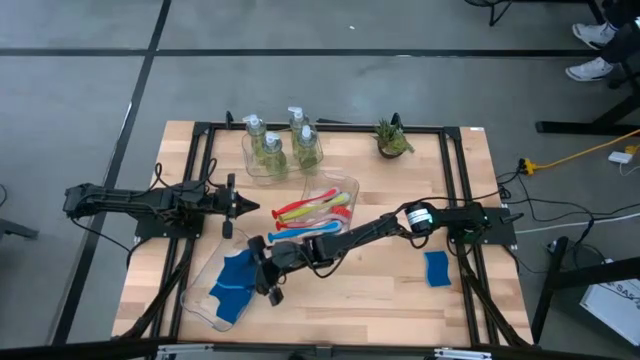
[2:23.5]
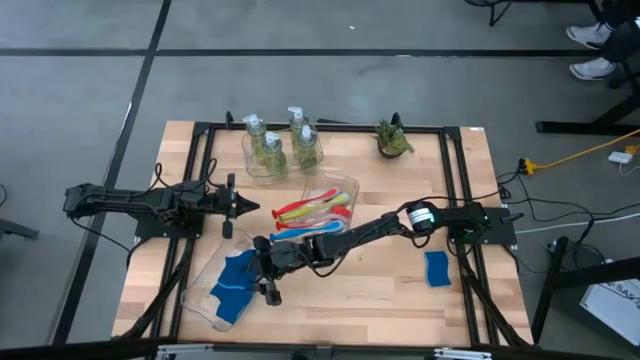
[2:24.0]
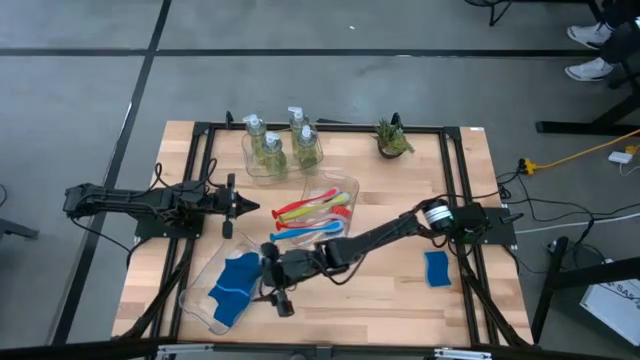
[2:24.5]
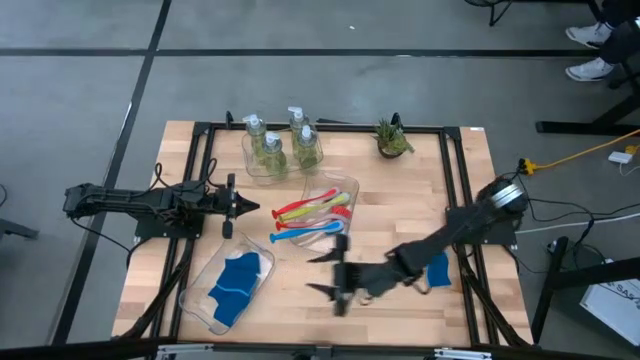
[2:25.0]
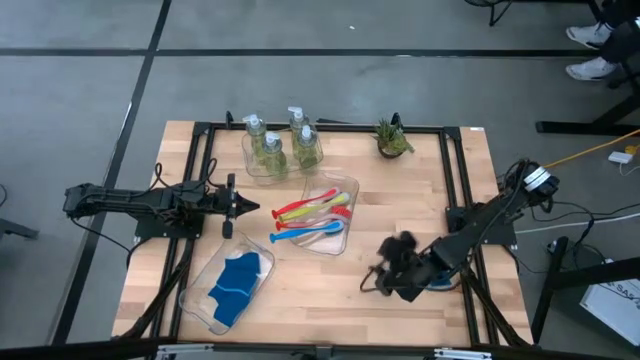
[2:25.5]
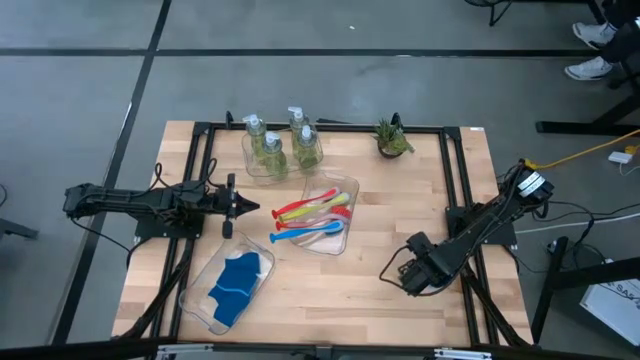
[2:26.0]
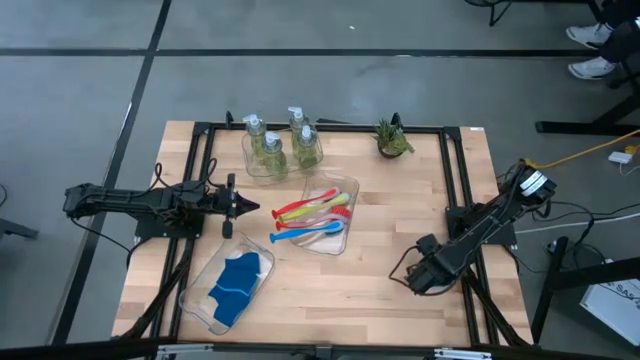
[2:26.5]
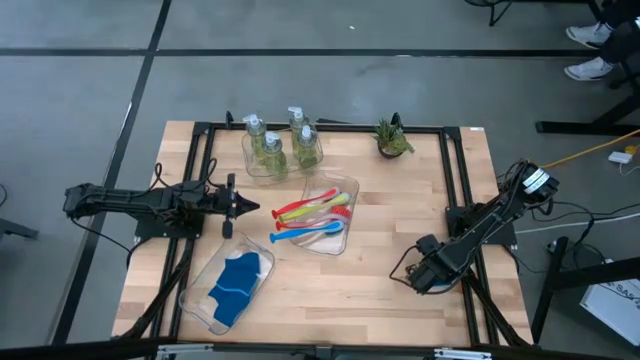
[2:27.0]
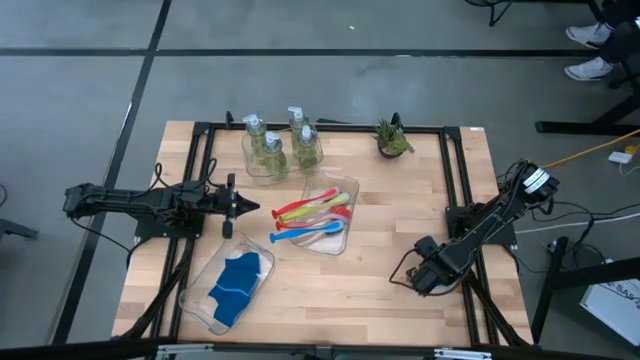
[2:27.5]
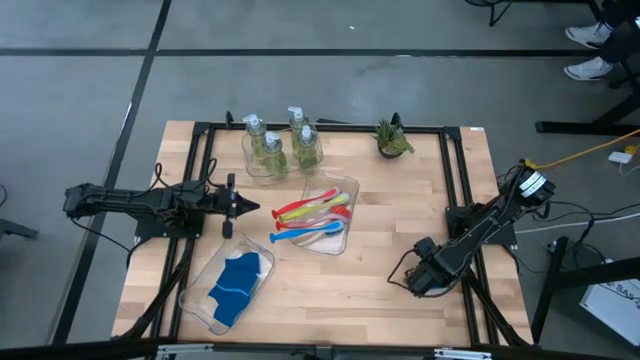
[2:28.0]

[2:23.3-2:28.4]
Task: Pick & Place Kitchen Sink Supplies
Put the blue sponge into the bottom transparent bin

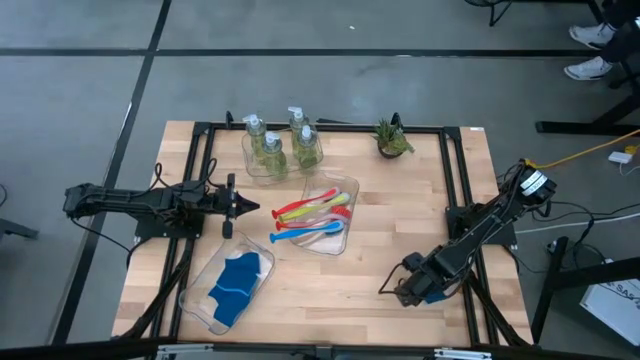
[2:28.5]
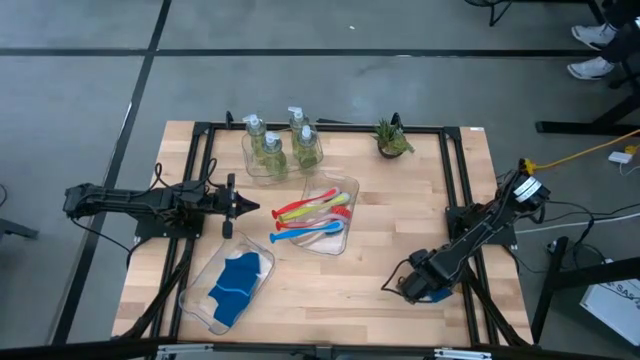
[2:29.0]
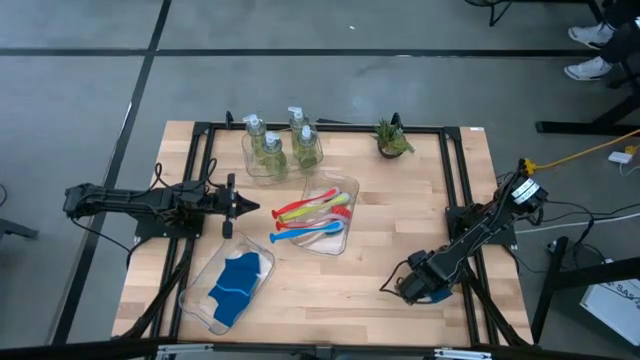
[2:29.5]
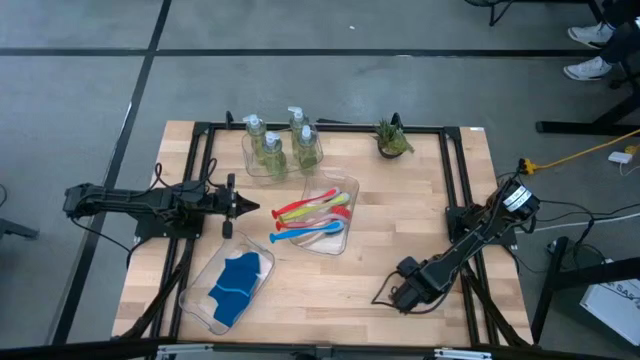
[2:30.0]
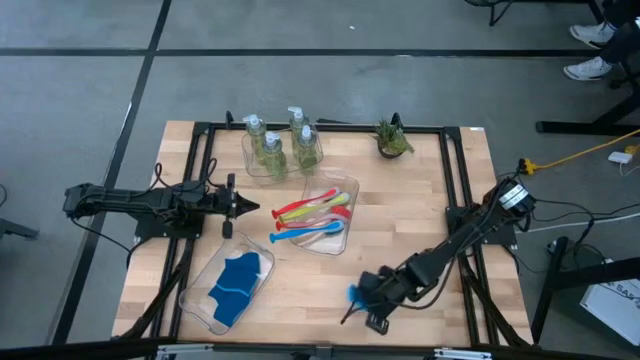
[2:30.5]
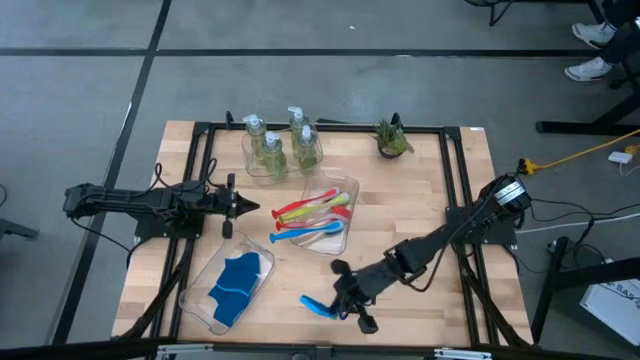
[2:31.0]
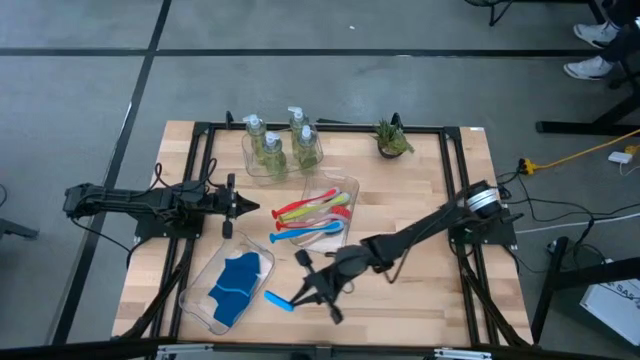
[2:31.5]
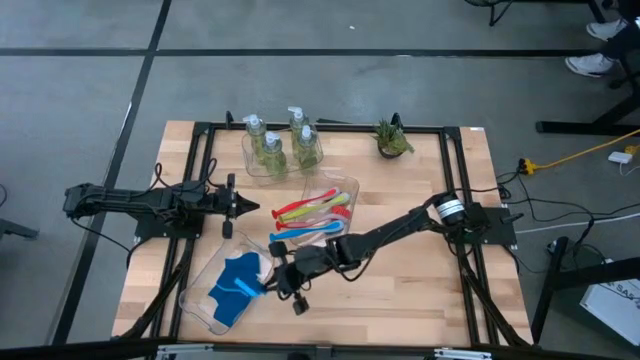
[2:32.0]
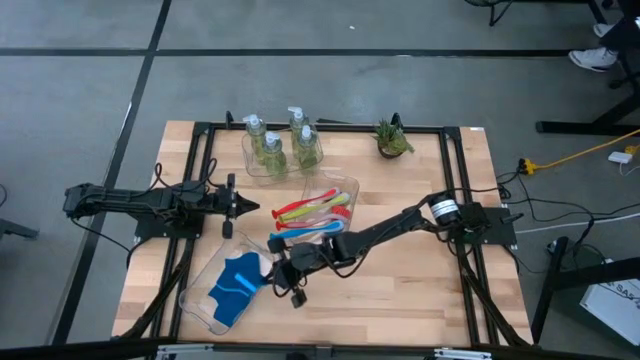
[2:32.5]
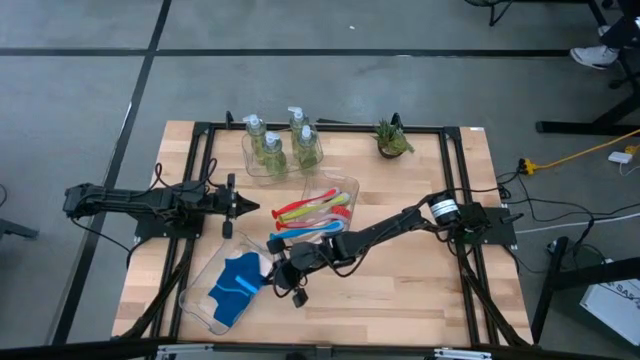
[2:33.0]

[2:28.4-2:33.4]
Put the blue sponge into the bottom transparent bin

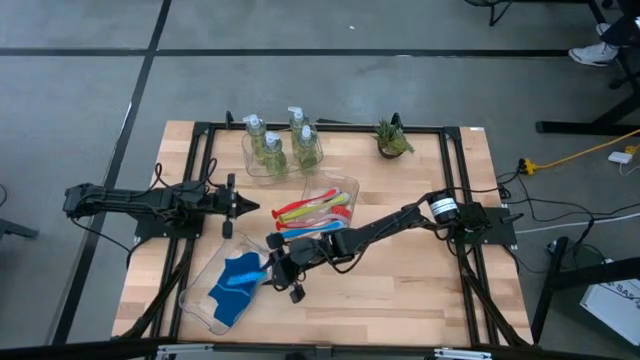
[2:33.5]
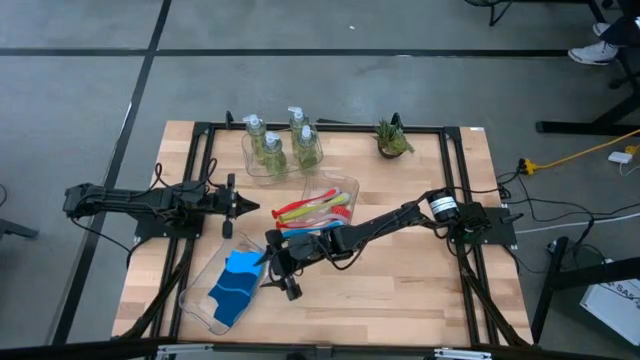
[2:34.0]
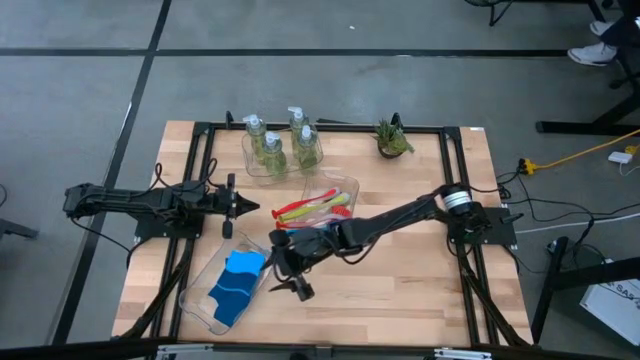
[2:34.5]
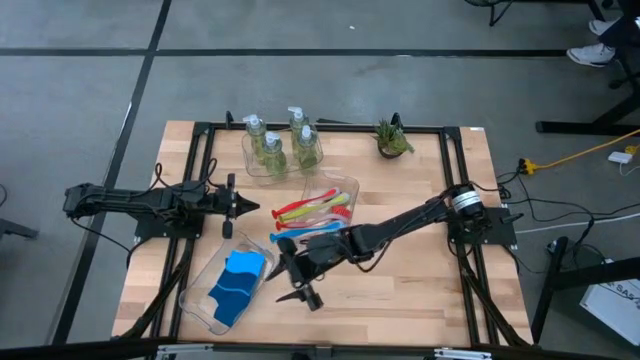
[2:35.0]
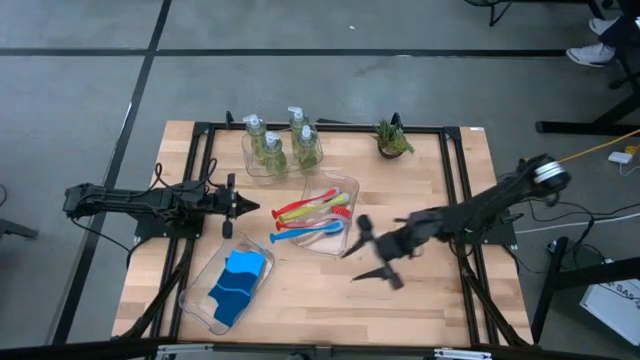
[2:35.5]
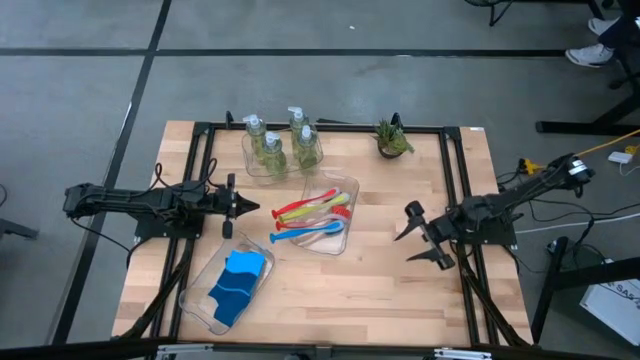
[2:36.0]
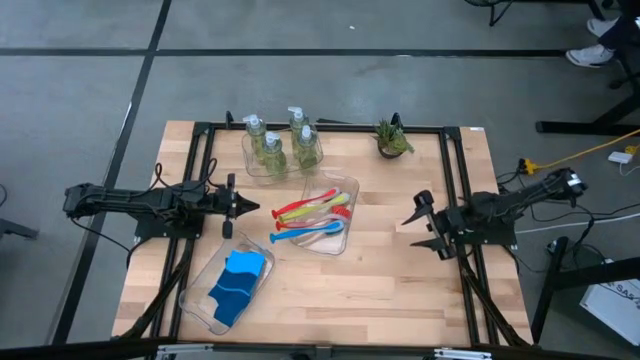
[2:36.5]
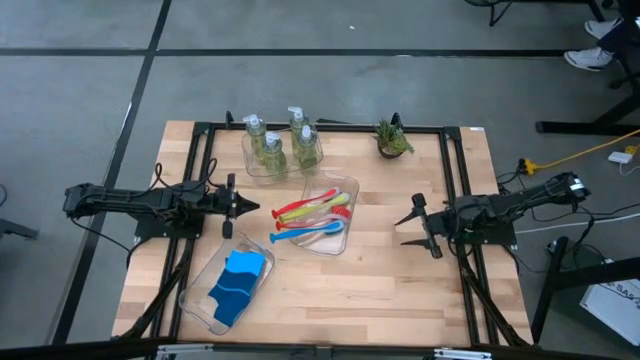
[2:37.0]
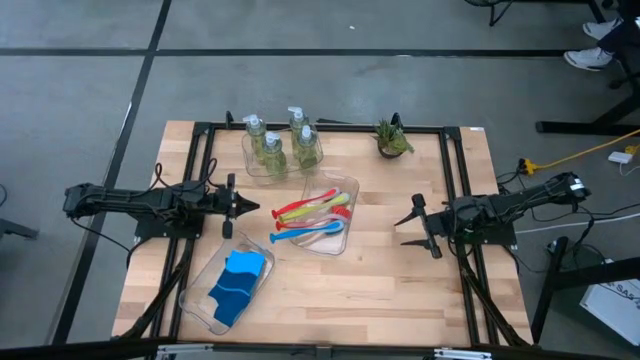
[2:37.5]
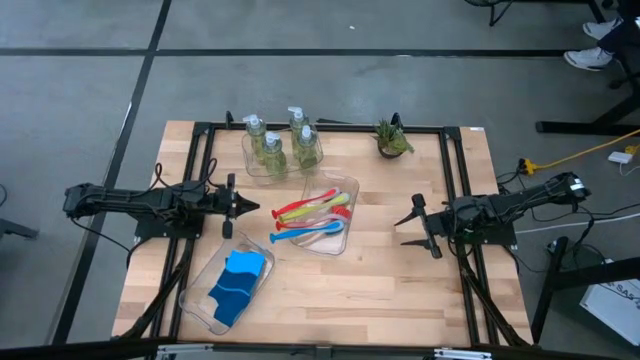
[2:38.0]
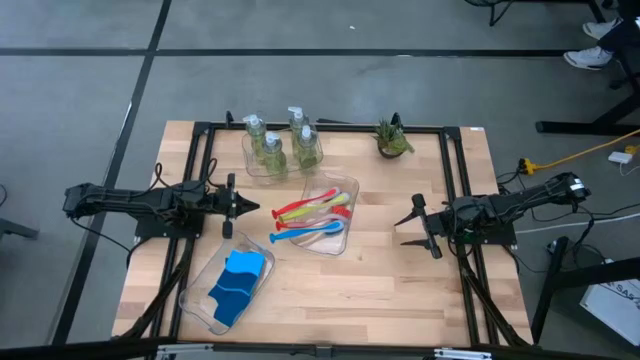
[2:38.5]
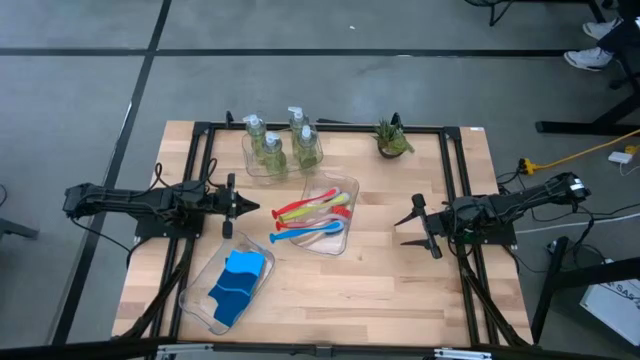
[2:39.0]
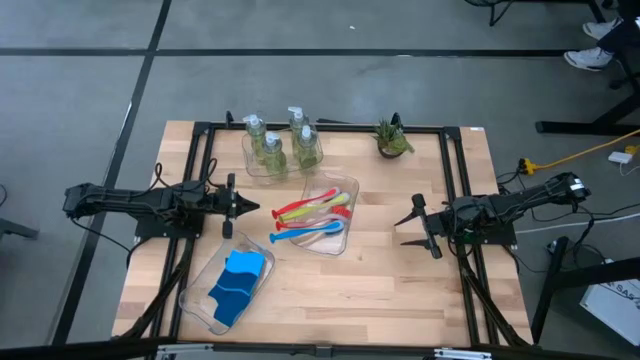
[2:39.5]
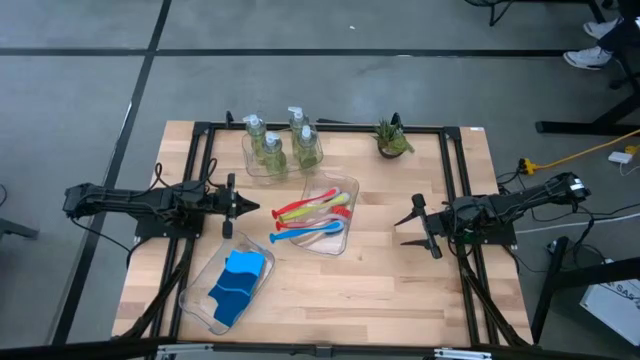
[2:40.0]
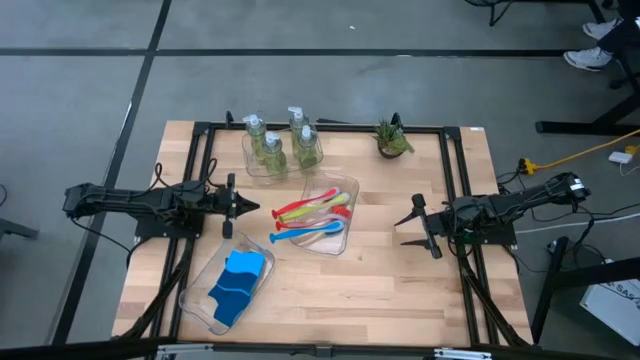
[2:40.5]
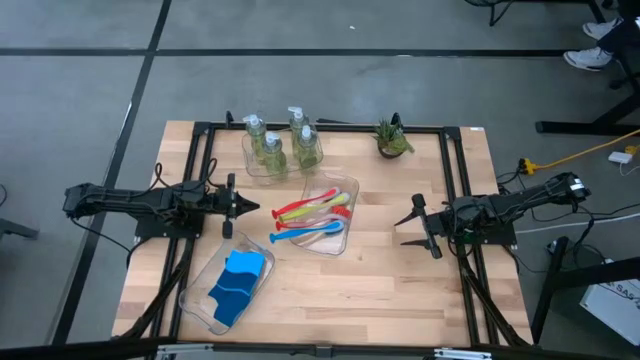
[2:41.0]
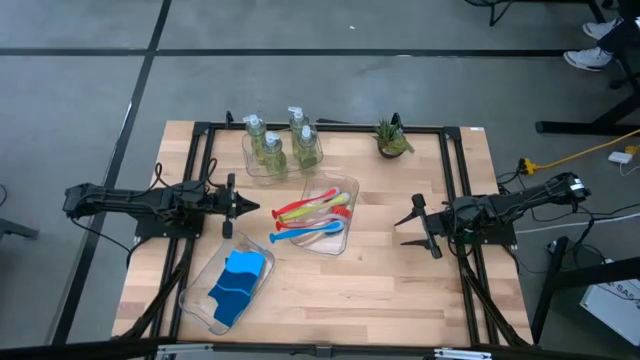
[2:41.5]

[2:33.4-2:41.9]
Return to Home Position

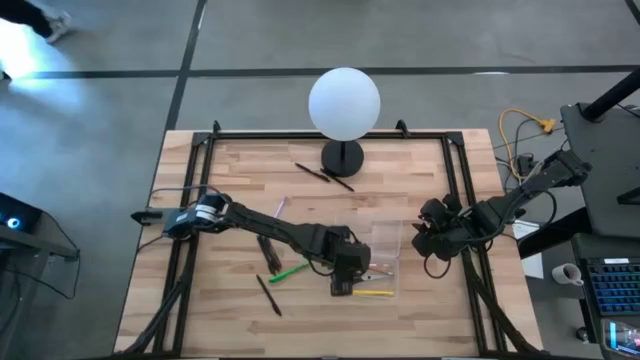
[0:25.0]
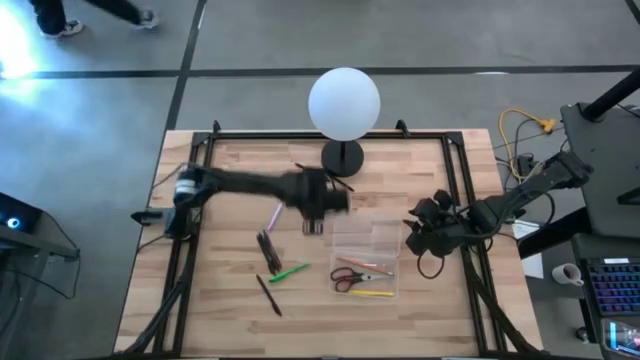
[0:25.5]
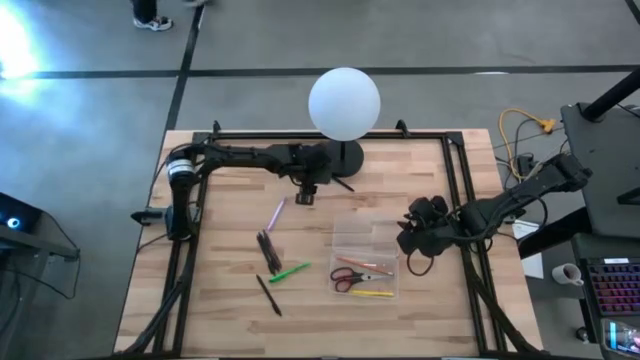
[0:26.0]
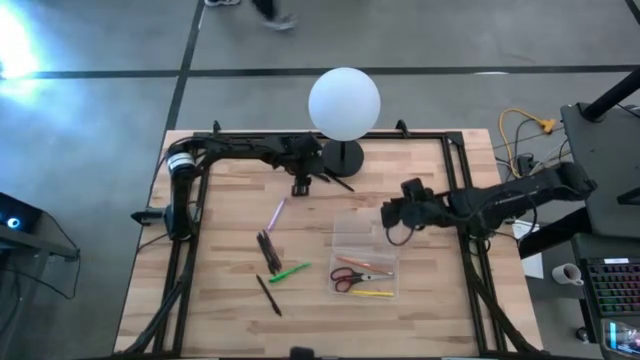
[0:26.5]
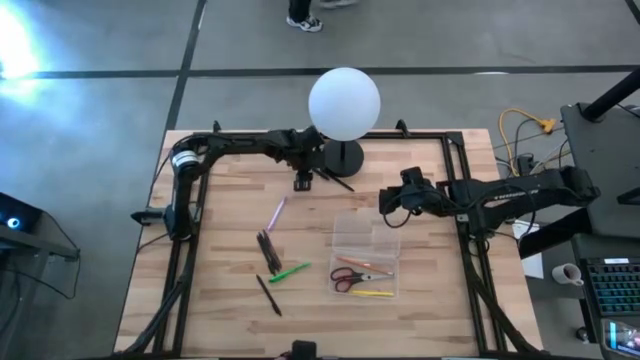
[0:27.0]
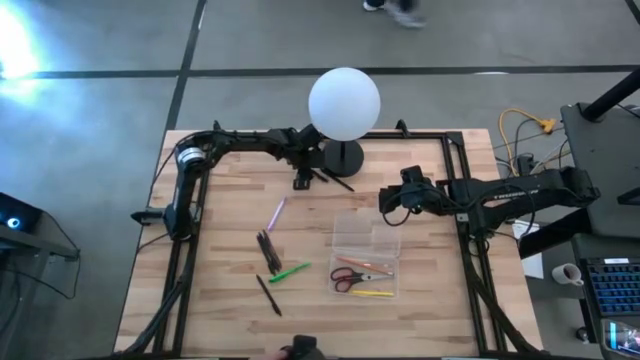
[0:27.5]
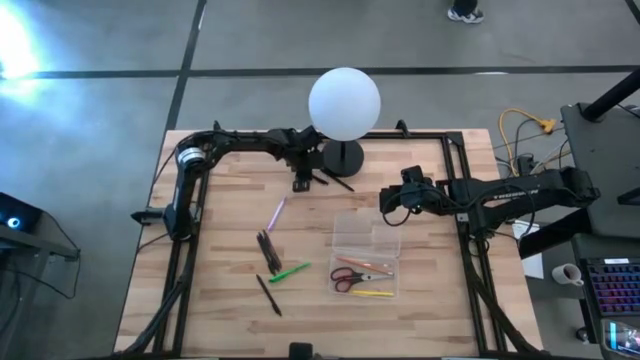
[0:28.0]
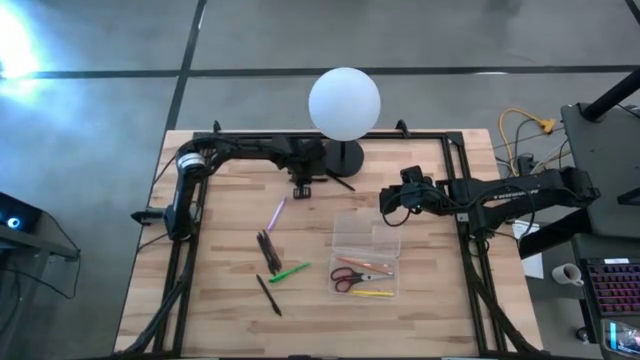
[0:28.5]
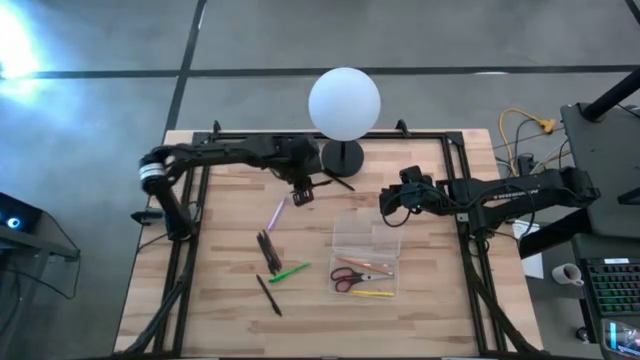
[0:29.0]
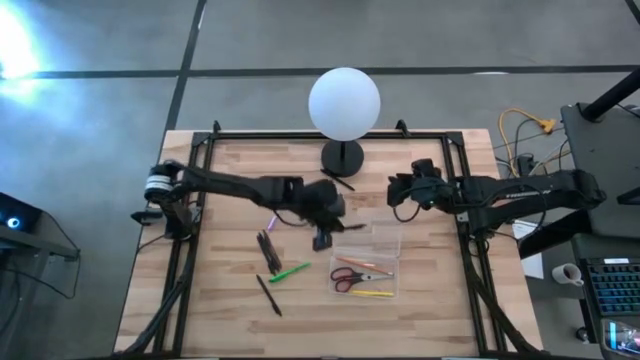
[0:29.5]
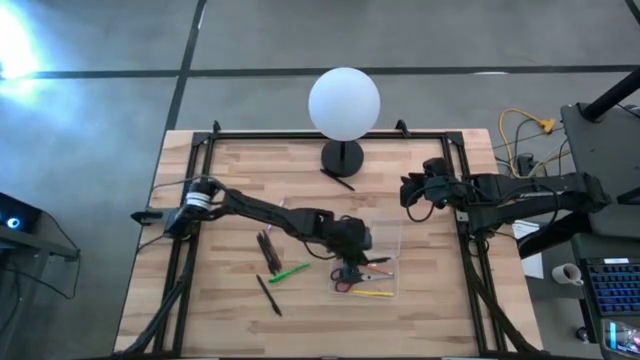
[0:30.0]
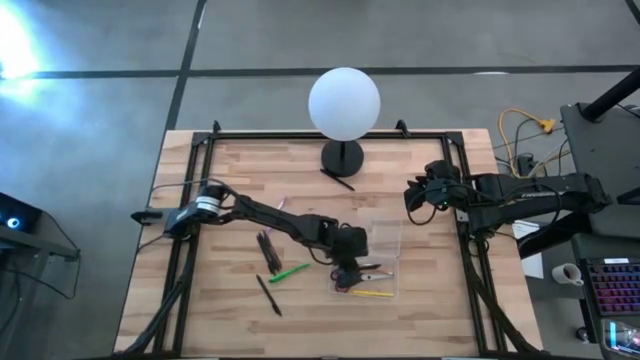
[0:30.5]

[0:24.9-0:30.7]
Task: Pick & place school supplies into a supply box
Put the black pen into the transparent supply box
